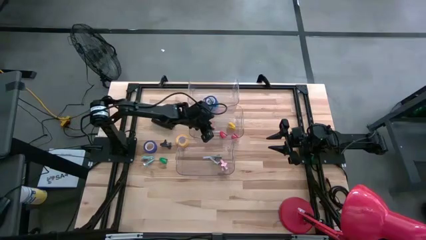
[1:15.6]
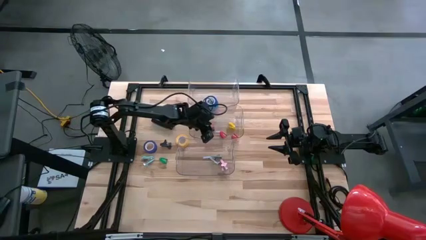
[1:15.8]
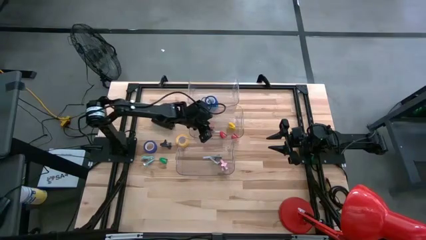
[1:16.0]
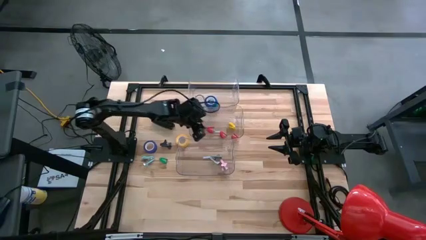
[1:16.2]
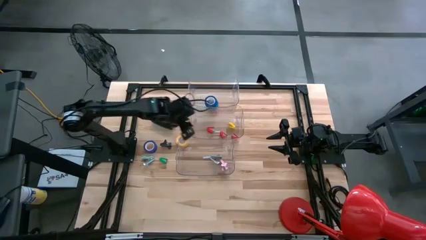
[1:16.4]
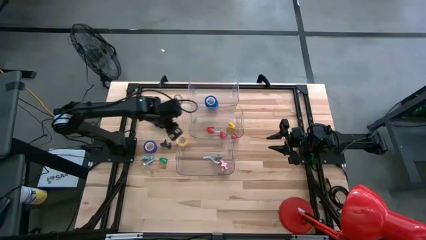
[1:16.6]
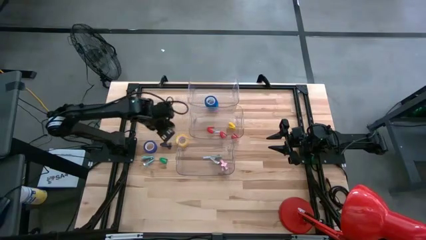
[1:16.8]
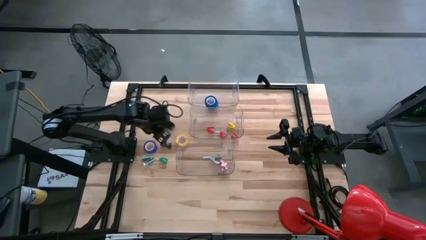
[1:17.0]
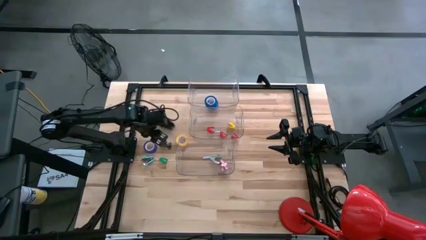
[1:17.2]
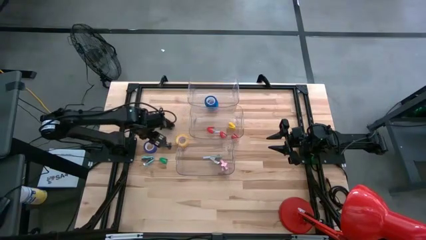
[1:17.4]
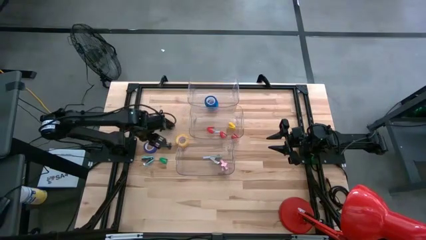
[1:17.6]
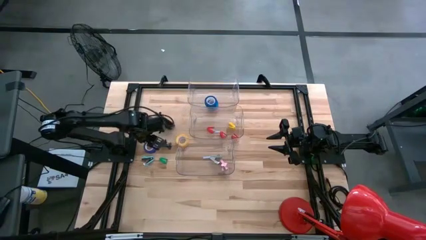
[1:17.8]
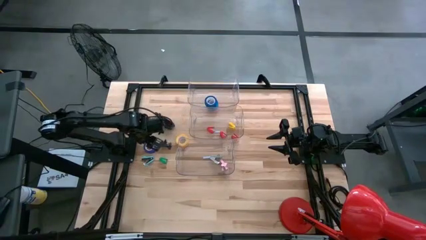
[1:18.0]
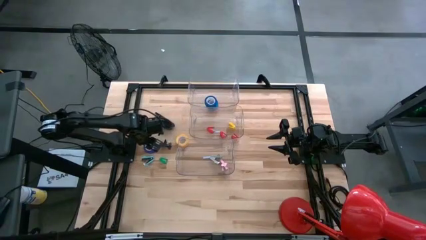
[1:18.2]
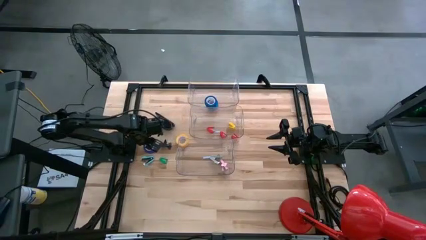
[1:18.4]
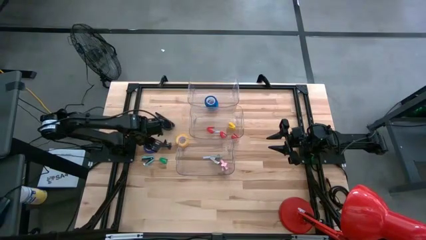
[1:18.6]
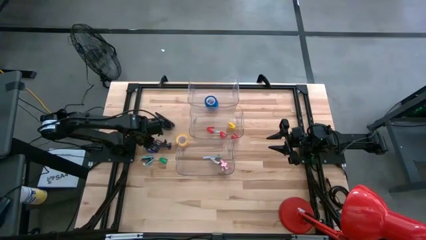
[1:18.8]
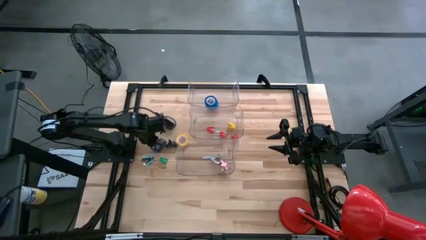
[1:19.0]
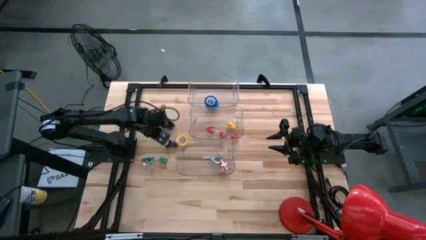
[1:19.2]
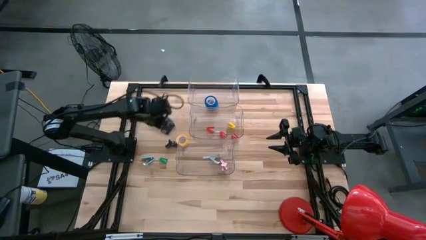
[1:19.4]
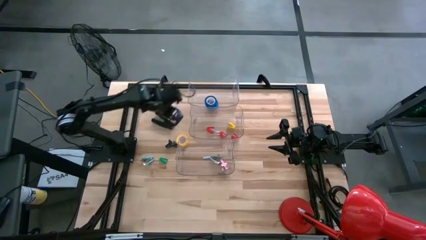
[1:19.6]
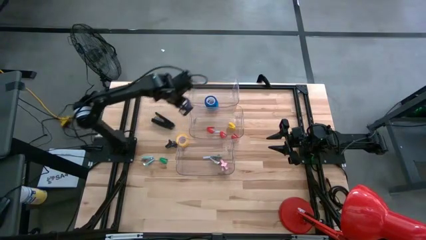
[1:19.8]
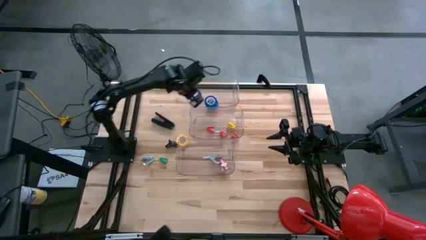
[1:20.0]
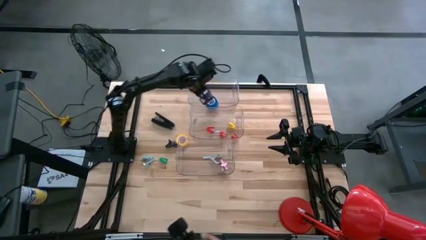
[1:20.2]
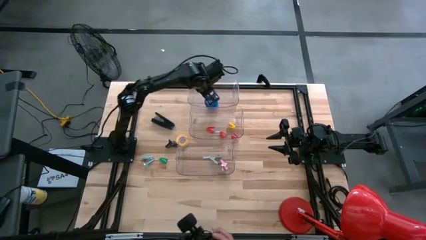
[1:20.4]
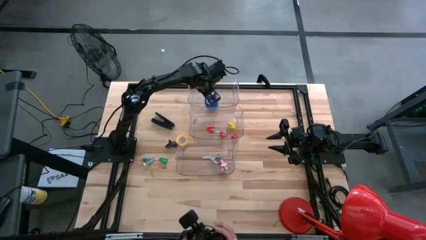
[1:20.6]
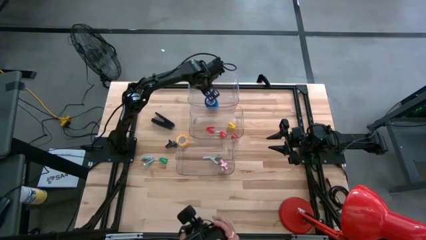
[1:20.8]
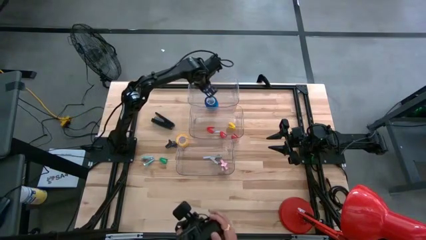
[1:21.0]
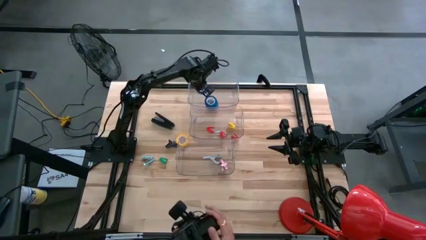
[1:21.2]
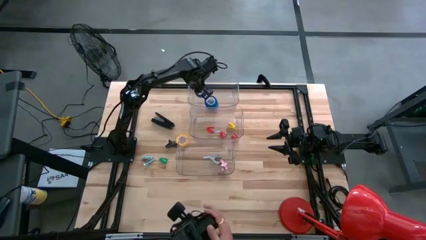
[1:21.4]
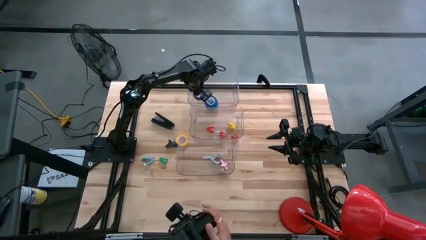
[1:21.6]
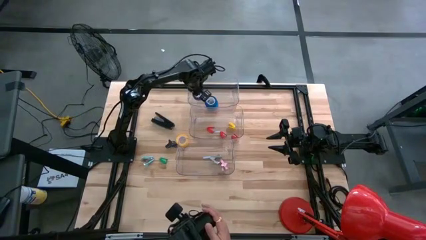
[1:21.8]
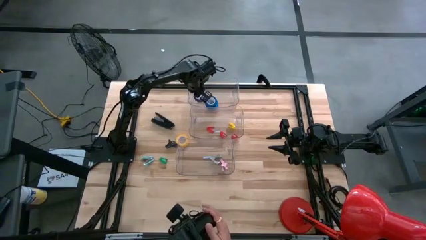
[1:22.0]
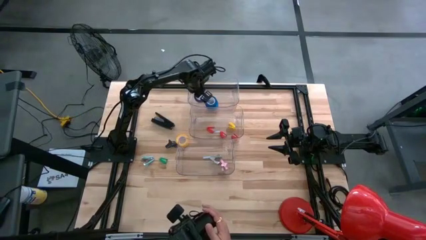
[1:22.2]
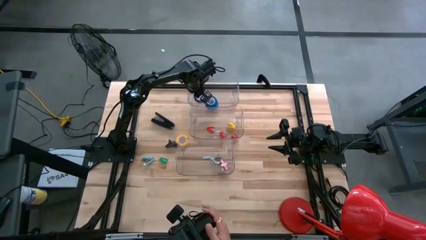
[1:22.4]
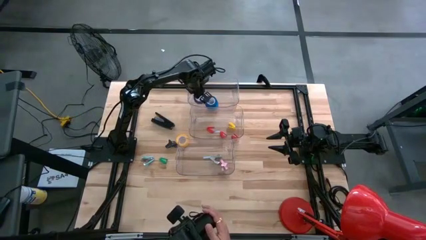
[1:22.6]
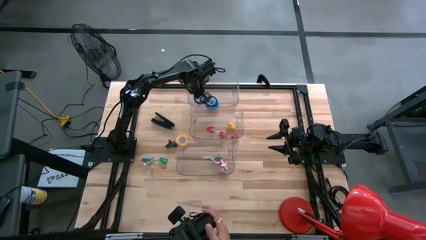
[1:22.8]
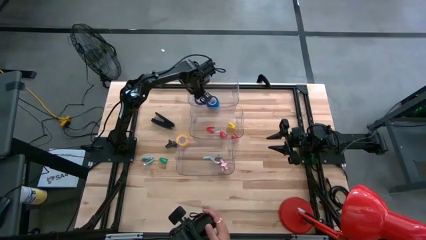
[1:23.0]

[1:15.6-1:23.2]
Task: Pick and place Stapler, Stapler remover, tape
Put the dark blue tape into the top transparent bin

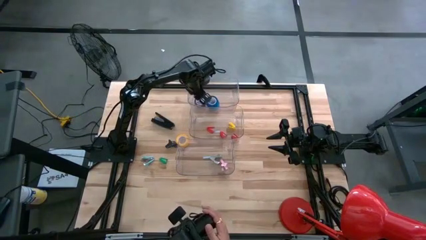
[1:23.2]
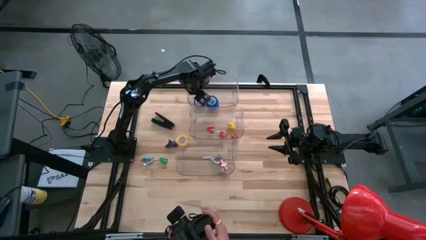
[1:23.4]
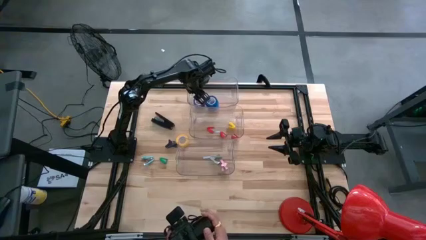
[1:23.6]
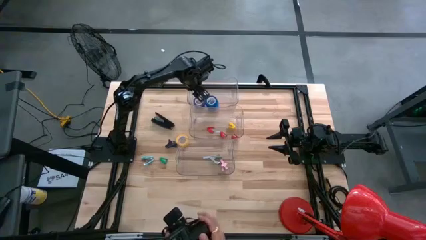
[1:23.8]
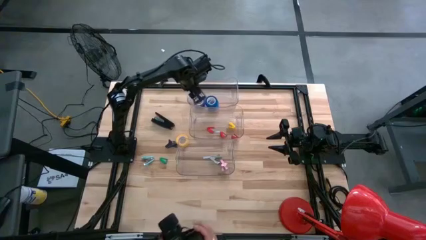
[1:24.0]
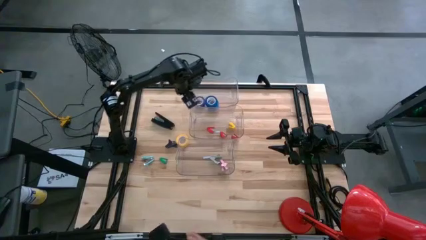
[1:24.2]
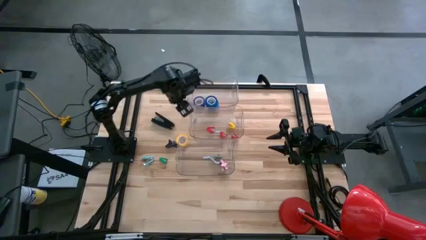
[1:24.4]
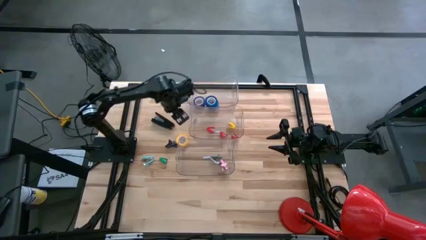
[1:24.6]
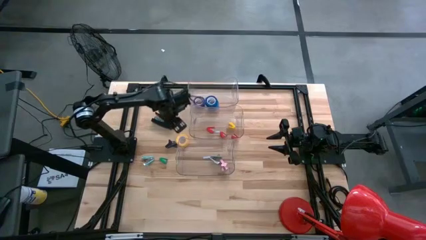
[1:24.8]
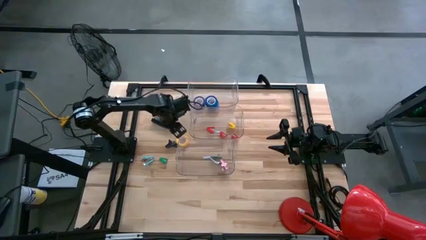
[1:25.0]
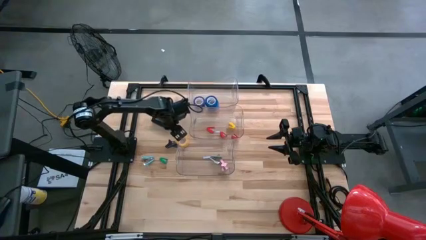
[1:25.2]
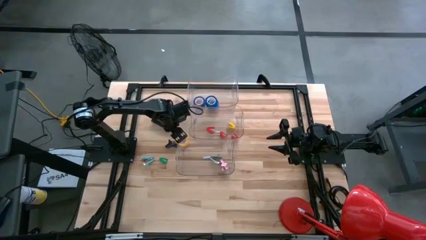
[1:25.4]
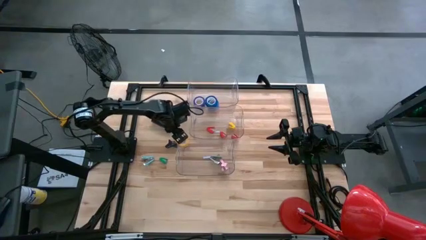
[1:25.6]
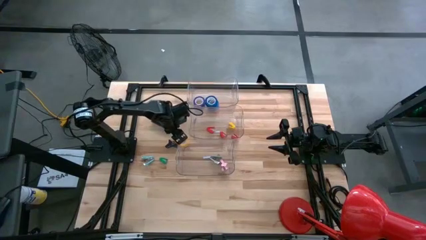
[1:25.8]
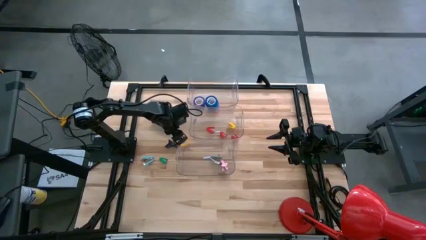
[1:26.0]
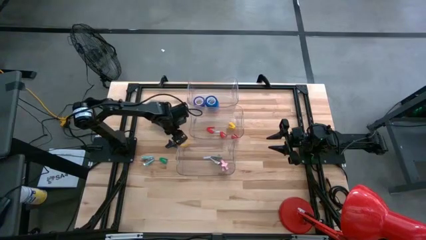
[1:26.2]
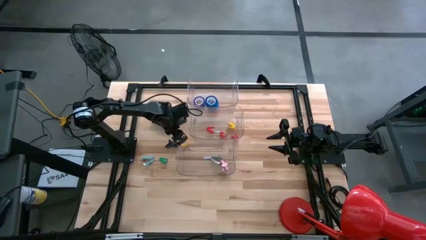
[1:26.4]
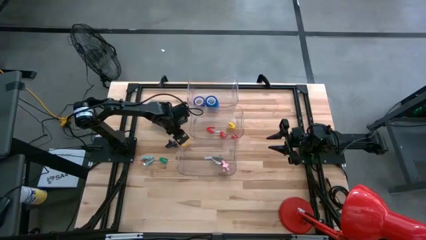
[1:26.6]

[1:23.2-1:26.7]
Put the yellow tape into the top transparent bin

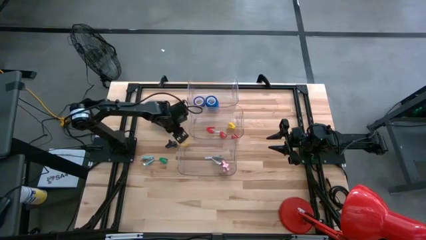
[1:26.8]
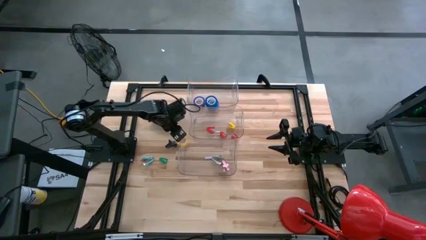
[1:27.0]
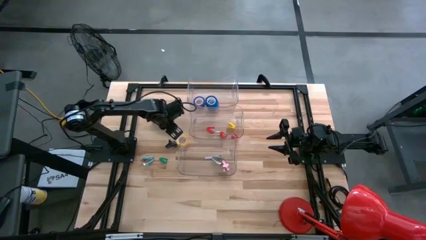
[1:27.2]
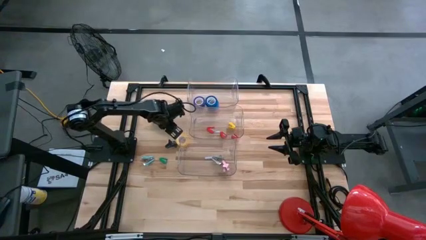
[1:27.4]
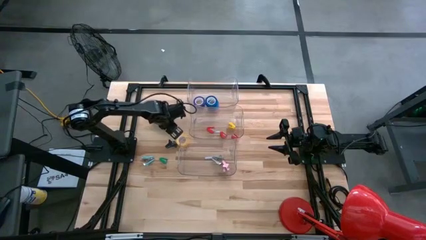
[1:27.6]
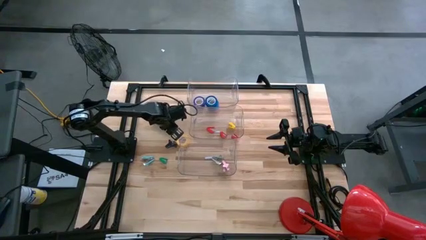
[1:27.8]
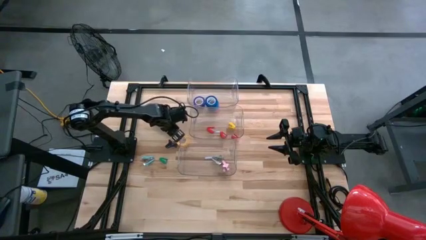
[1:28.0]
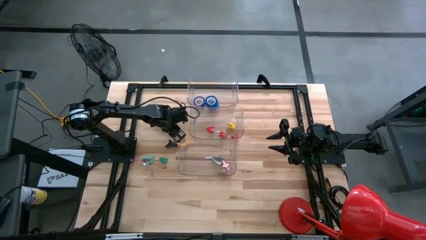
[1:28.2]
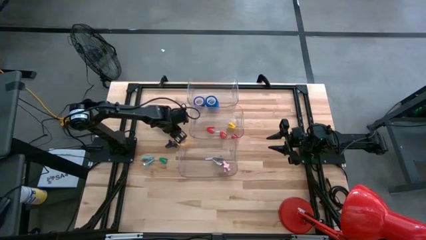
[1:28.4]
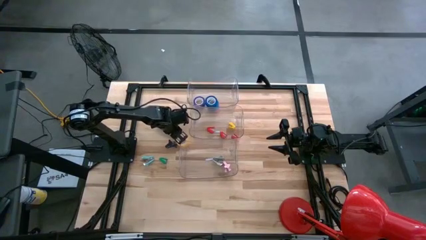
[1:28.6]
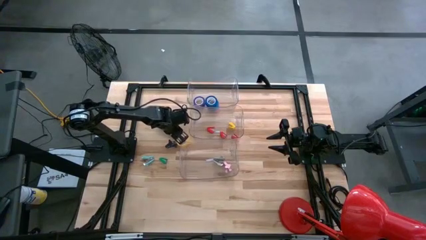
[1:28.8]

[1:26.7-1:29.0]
Adjust the black stapler

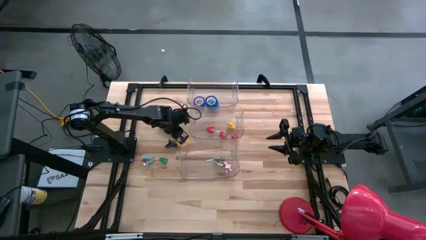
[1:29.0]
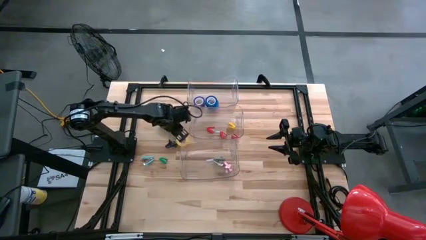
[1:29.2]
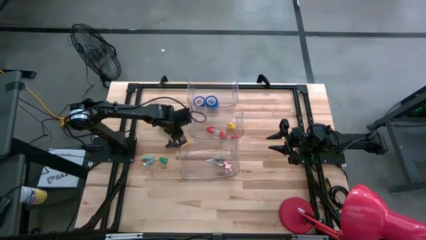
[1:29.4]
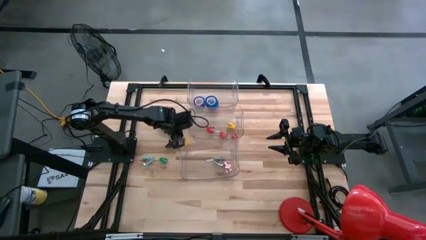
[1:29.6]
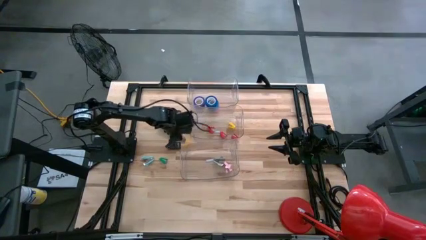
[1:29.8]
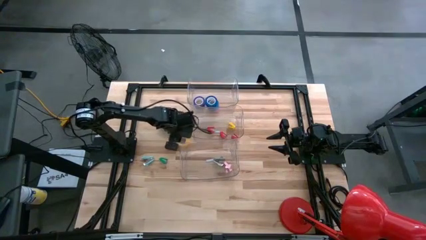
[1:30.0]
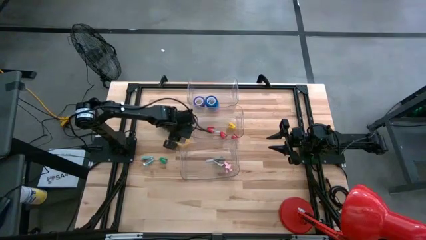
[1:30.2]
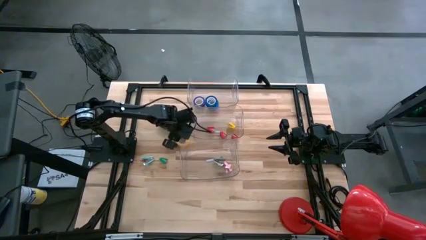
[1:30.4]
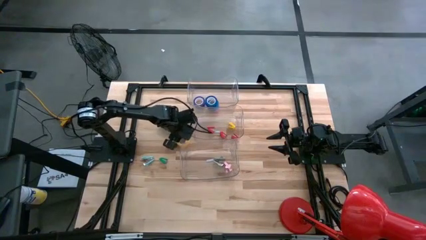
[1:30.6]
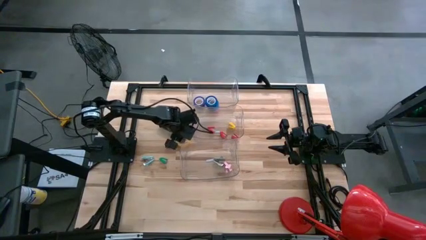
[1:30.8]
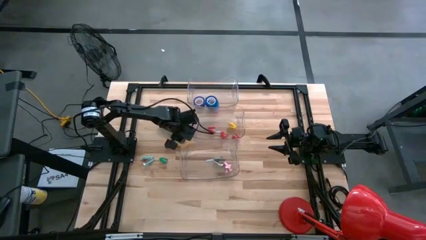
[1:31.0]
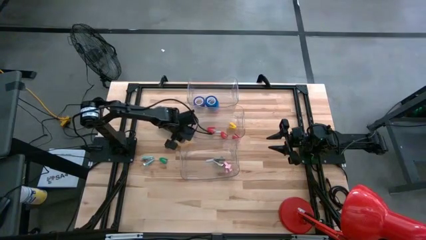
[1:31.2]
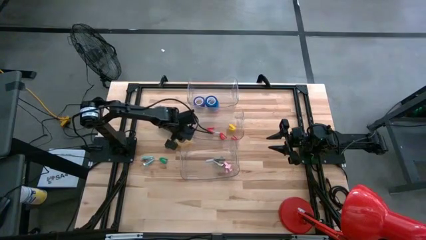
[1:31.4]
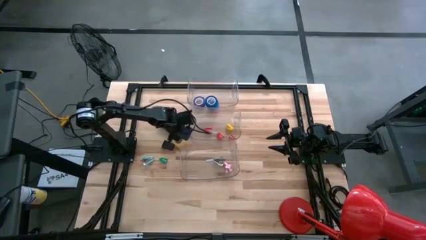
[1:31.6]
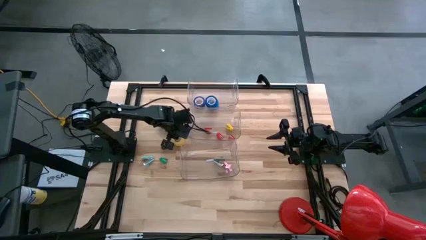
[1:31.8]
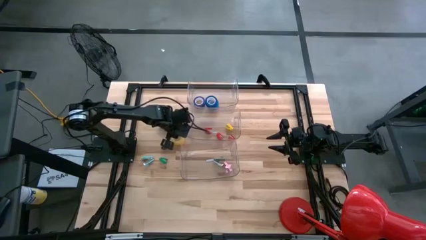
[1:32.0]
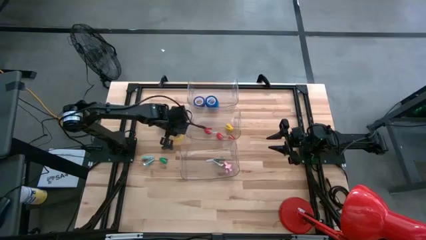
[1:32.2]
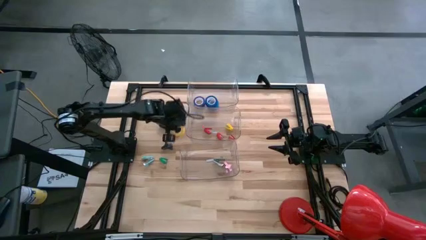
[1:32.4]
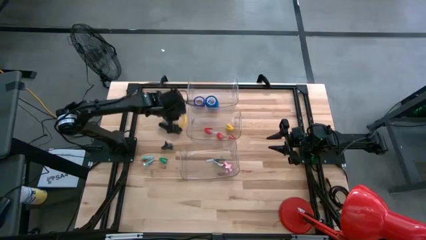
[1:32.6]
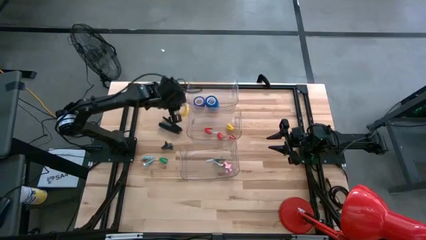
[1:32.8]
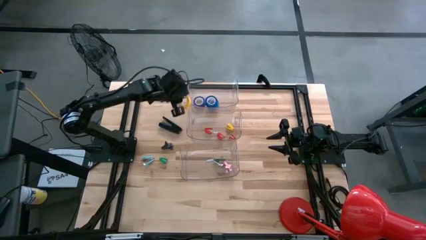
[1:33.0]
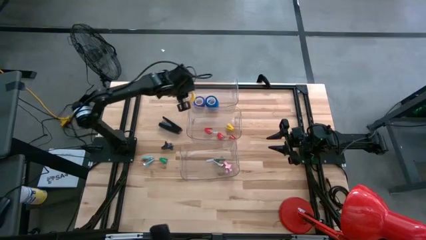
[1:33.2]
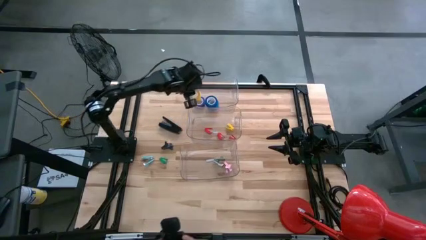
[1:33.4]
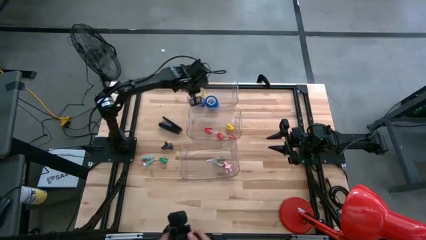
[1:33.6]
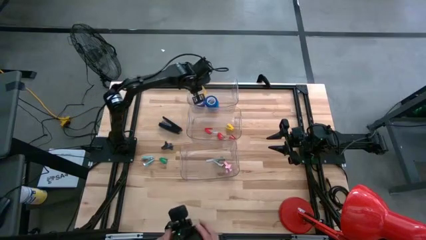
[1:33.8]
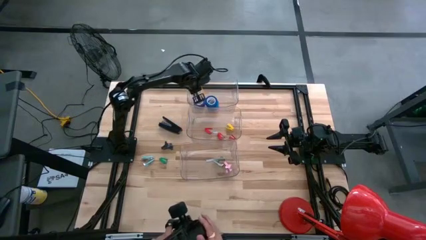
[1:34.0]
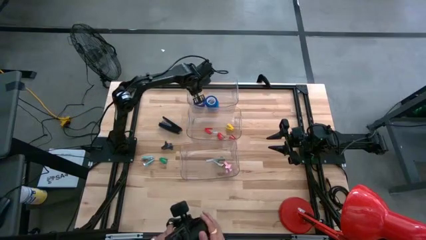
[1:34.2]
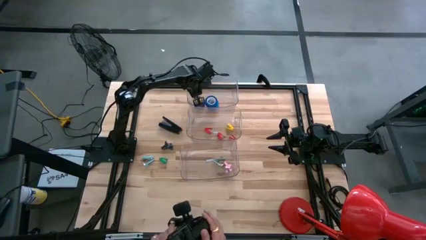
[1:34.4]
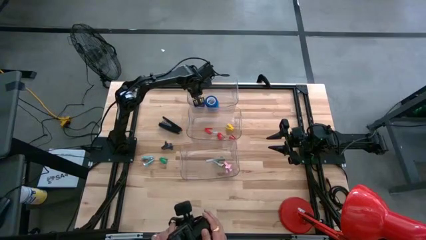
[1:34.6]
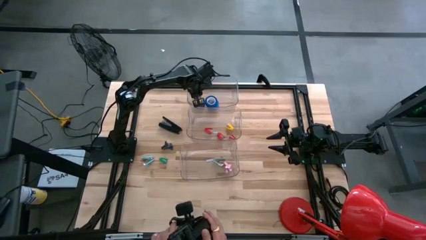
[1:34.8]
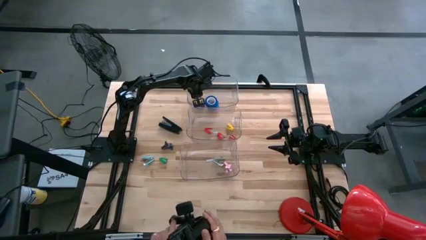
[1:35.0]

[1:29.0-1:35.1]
Put the yellow tape into the top transparent bin
